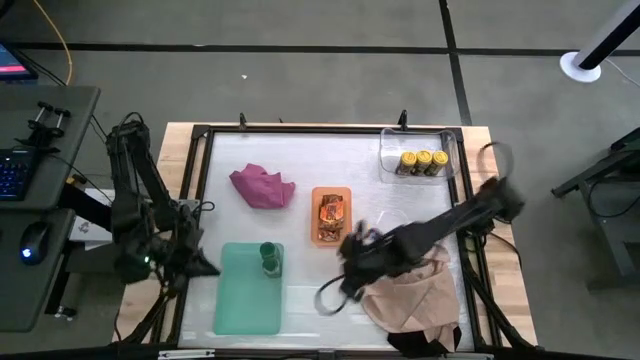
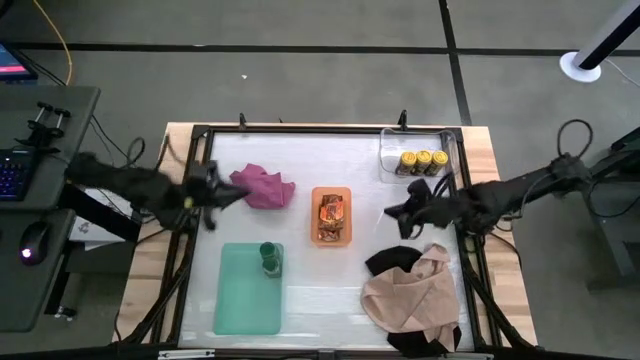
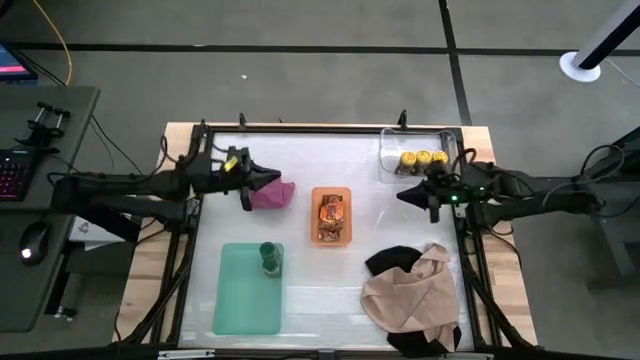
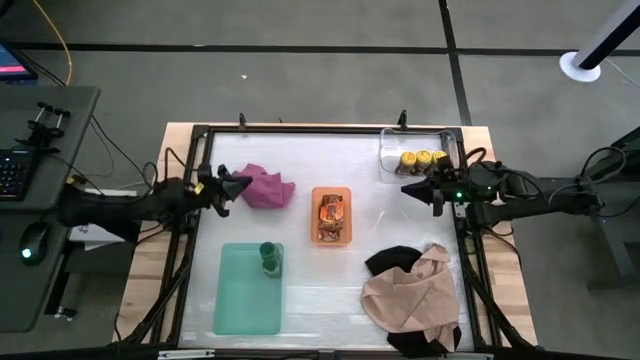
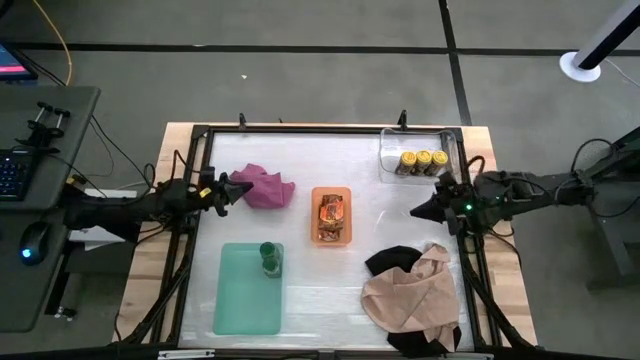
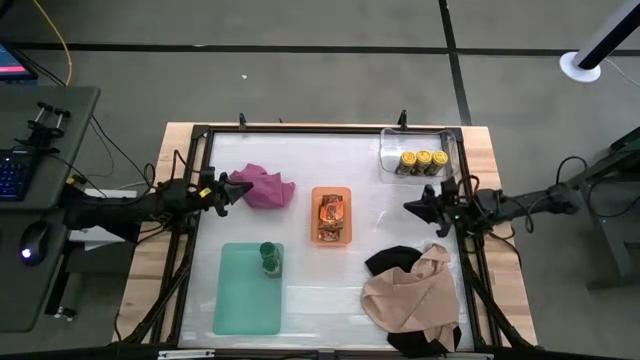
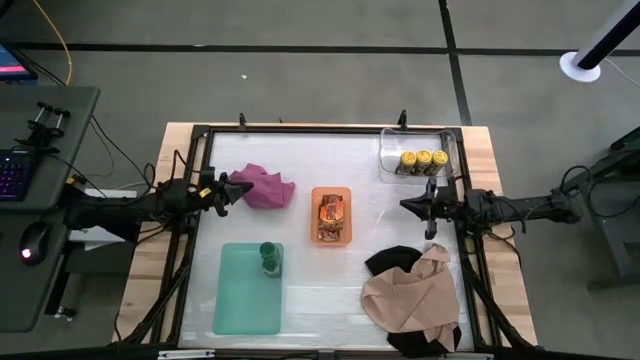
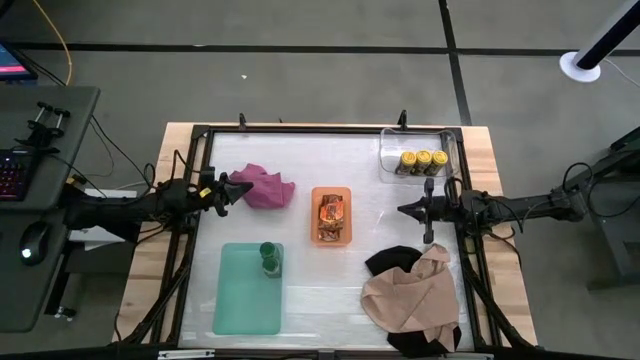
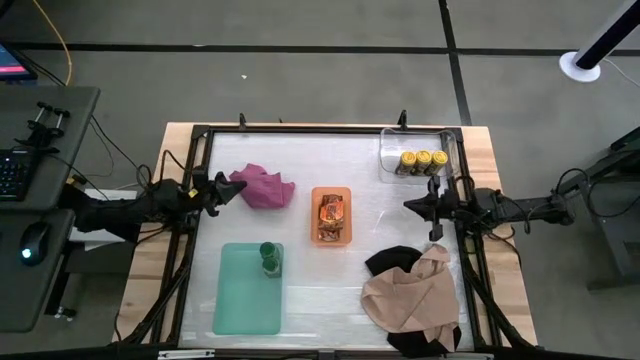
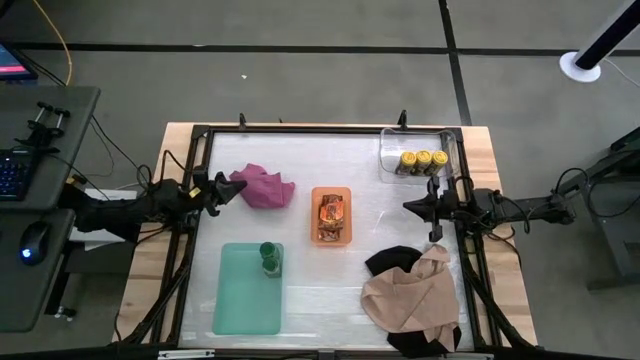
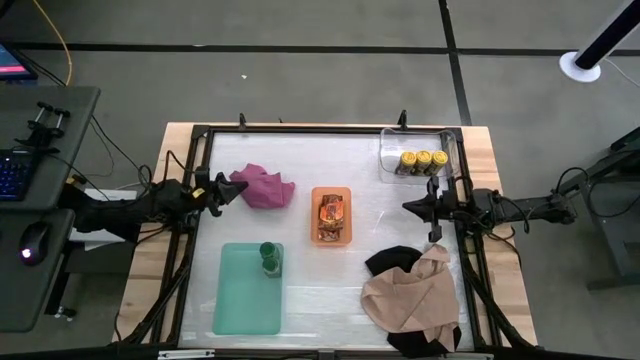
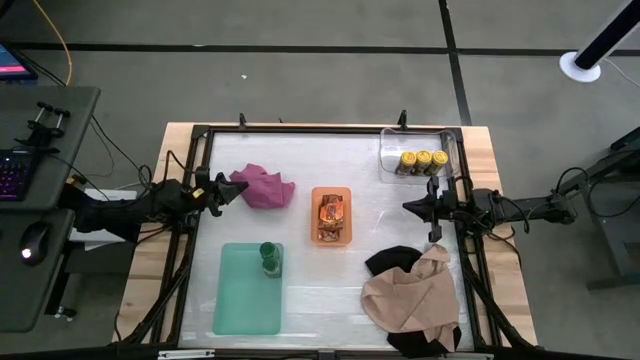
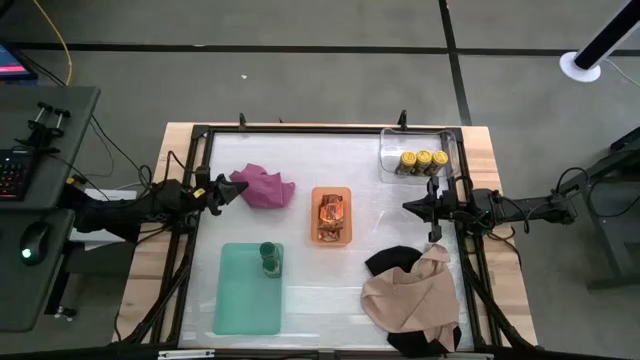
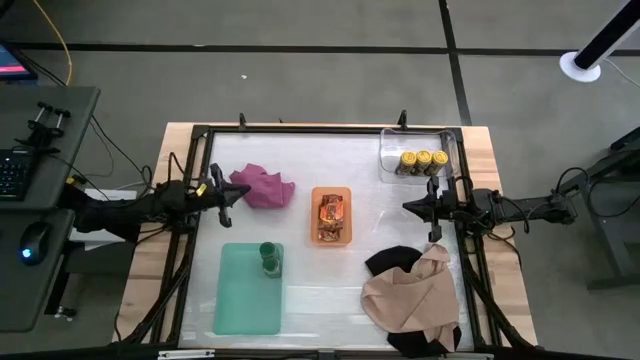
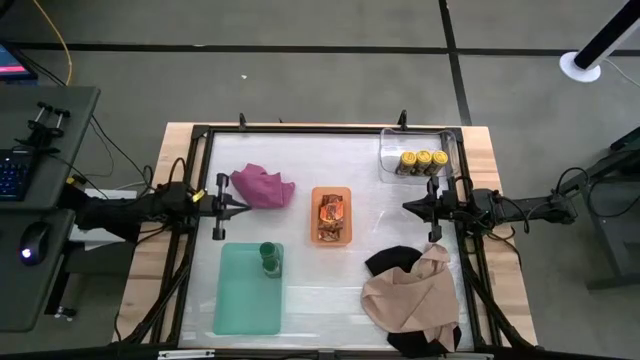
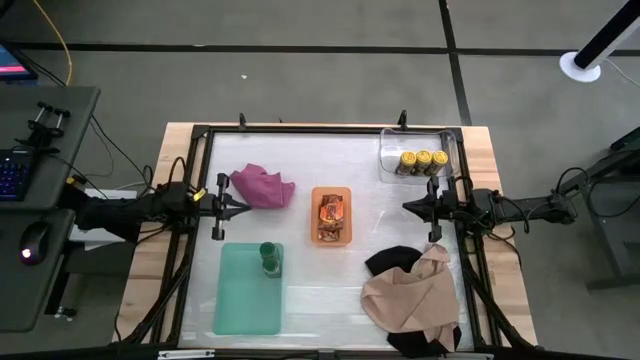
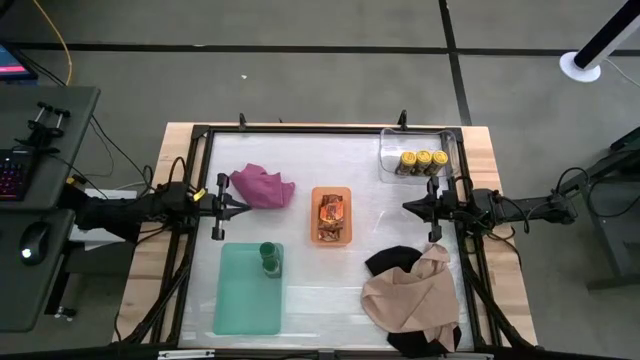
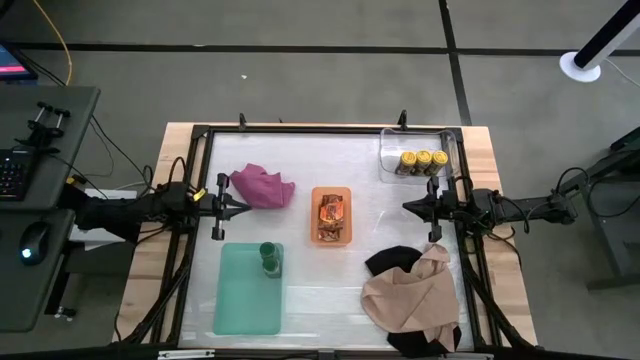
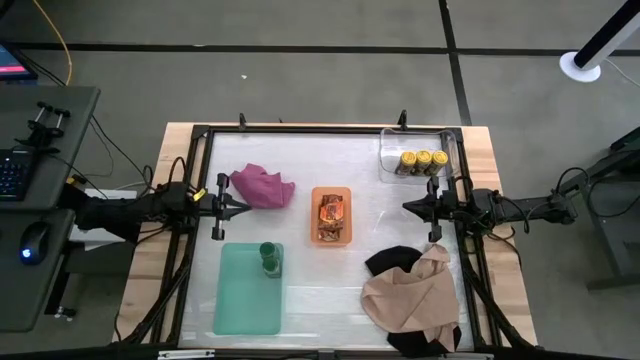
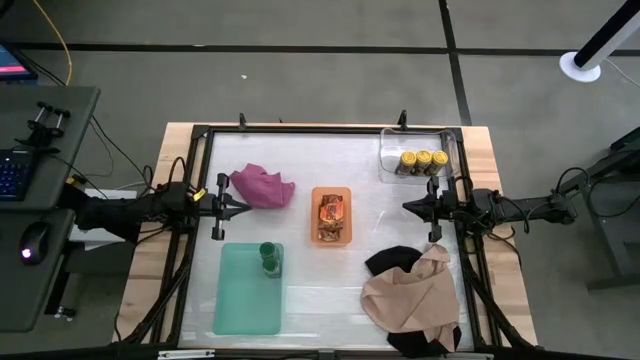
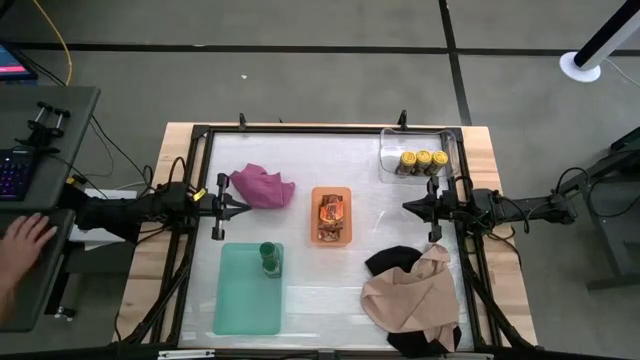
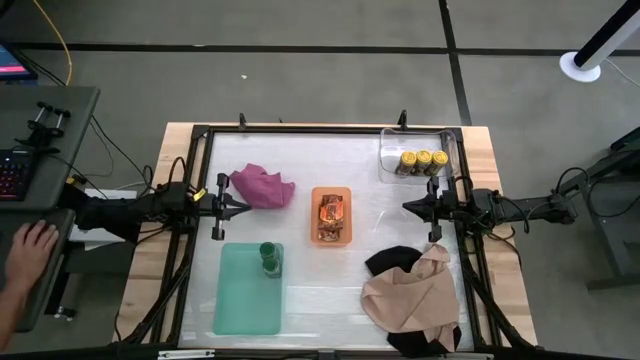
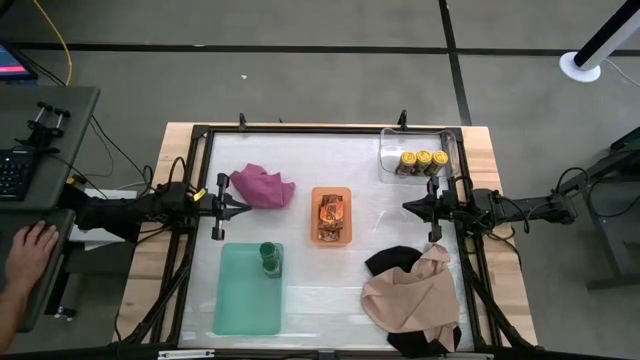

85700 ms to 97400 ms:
Task: Sort spices by type
Return to Home Position

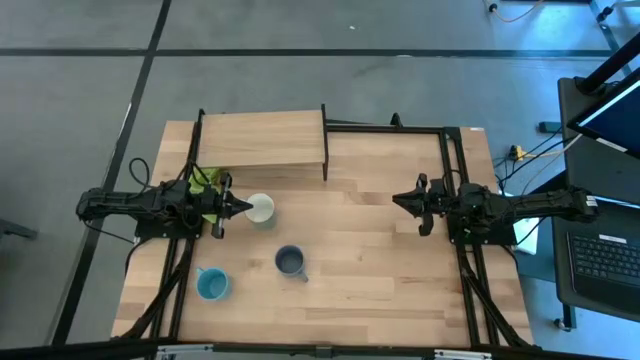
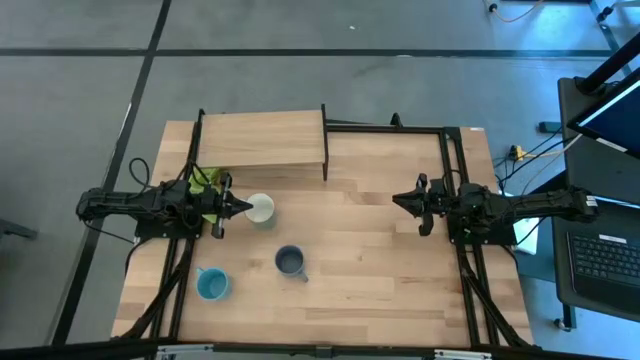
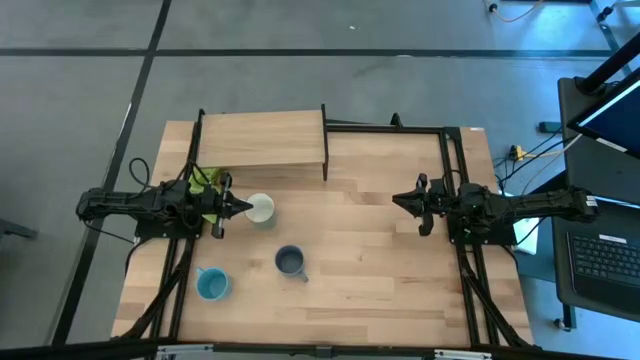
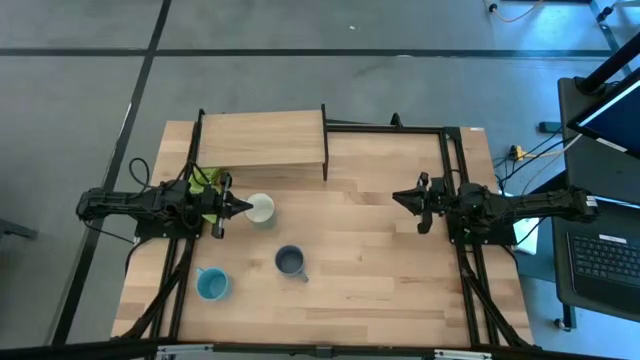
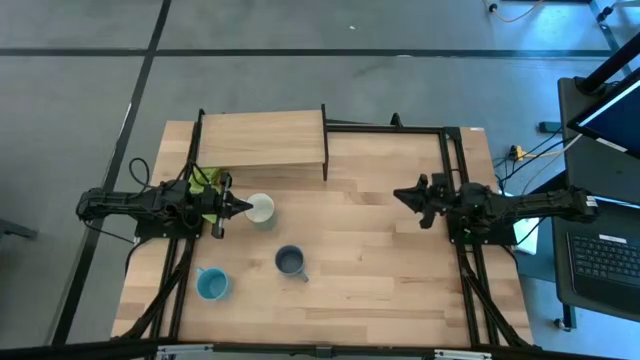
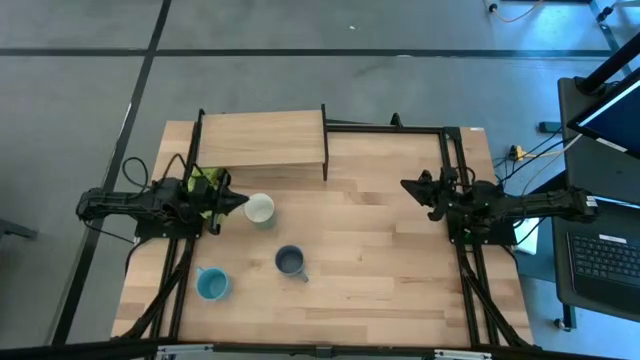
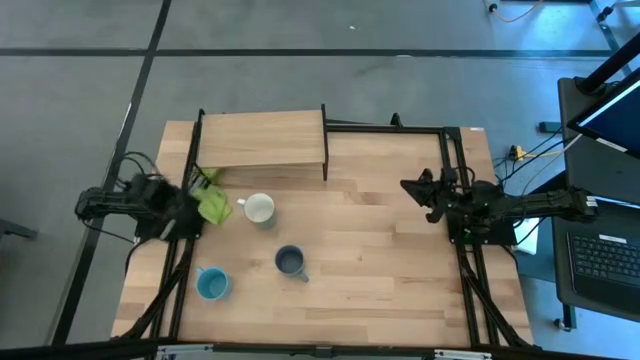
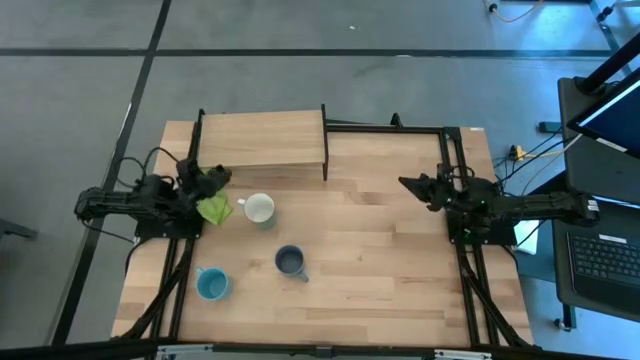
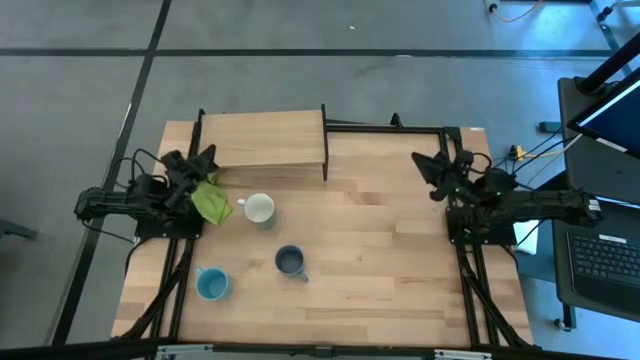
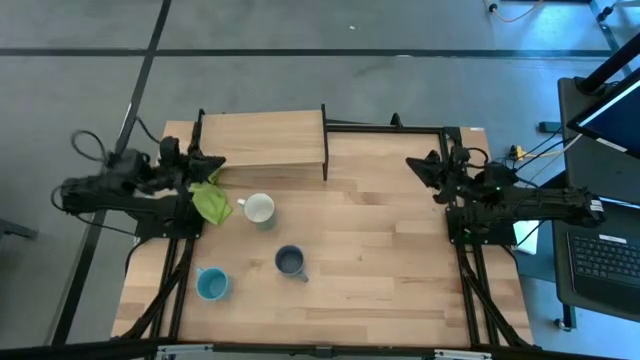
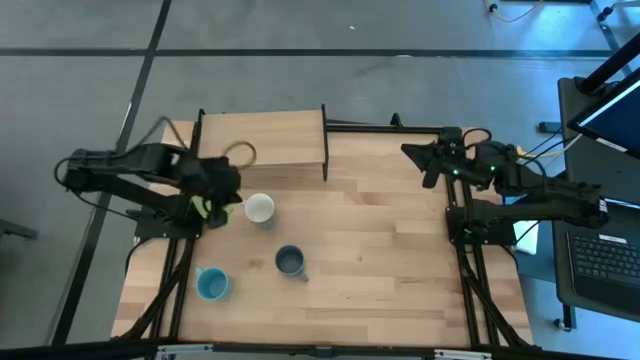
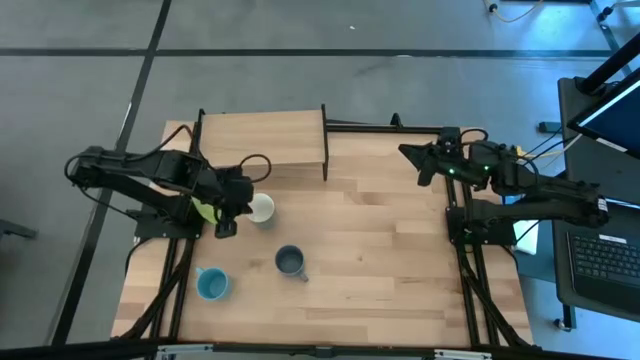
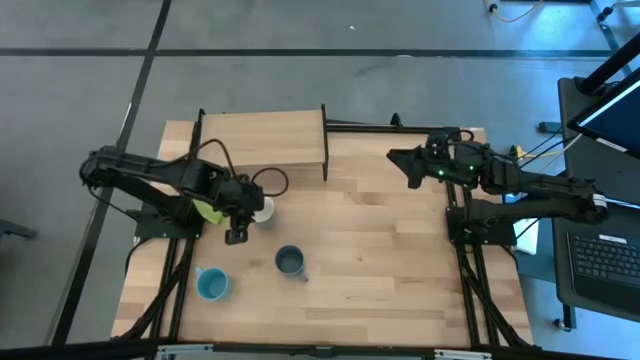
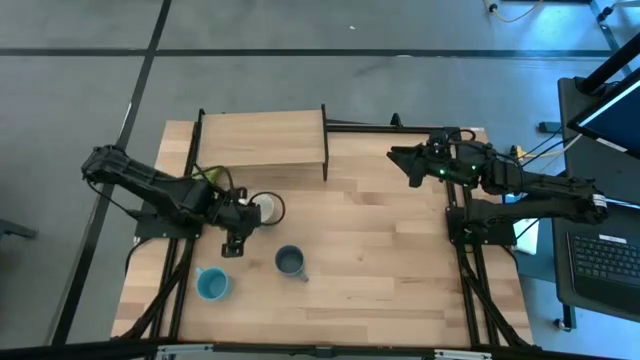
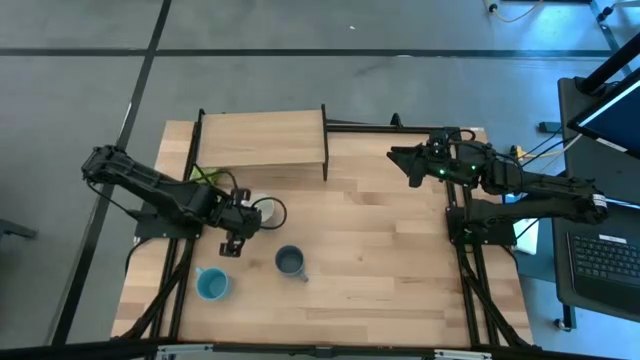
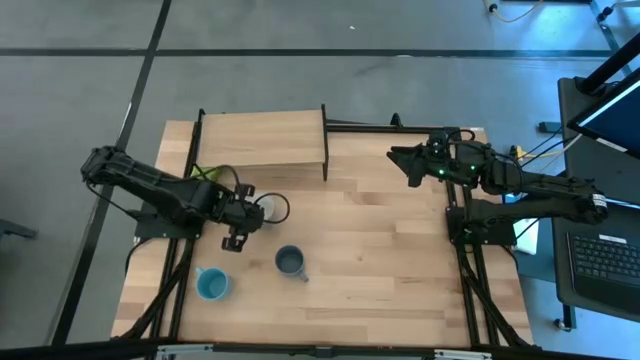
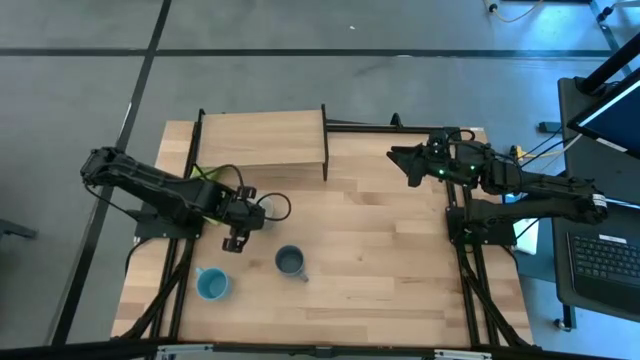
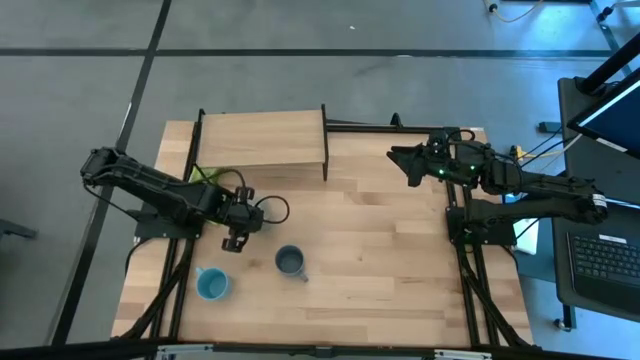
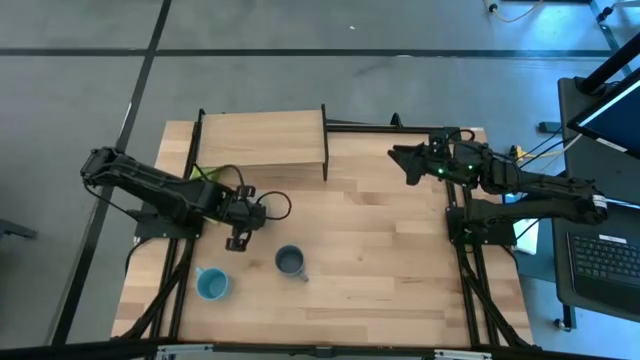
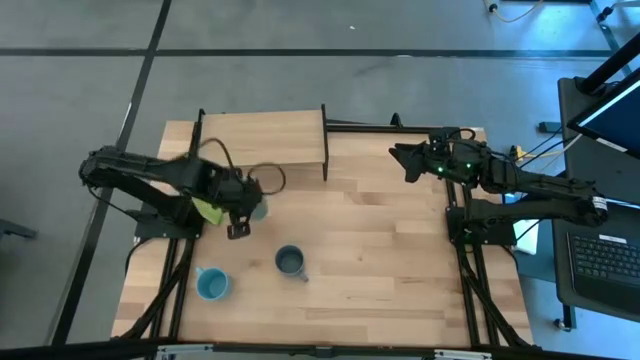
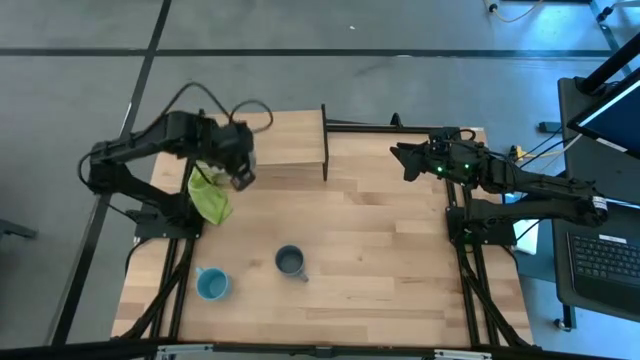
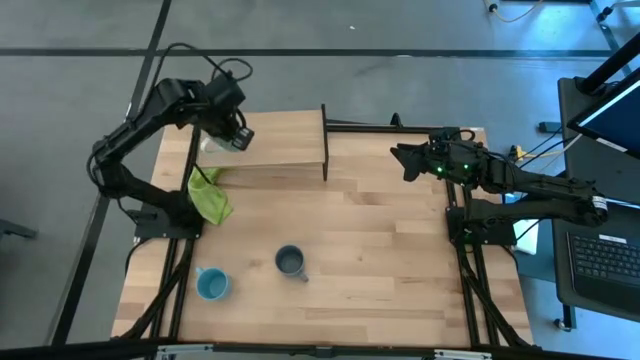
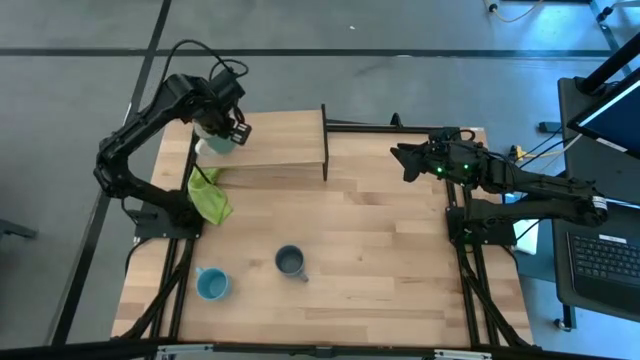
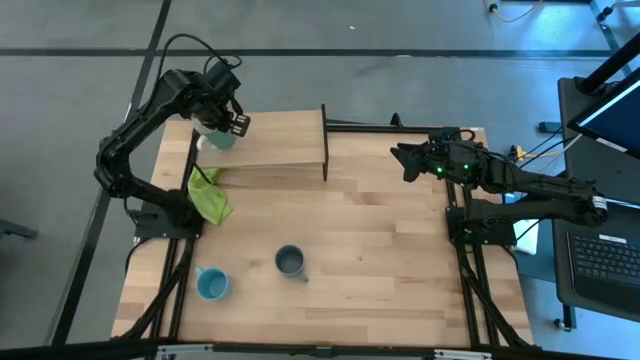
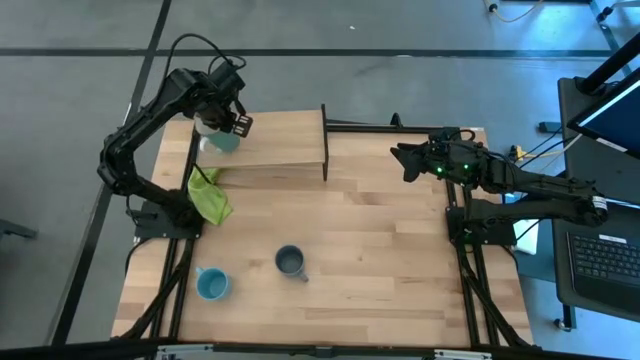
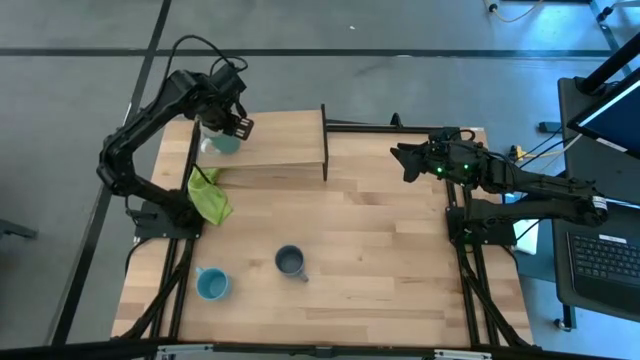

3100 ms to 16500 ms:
Task: Stack small to large cups/mugs on shelf
Put the green mug on the shelf
